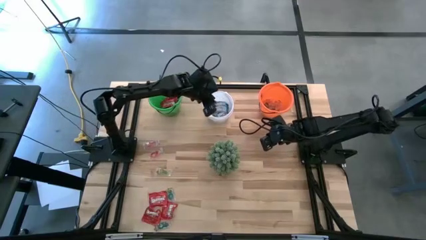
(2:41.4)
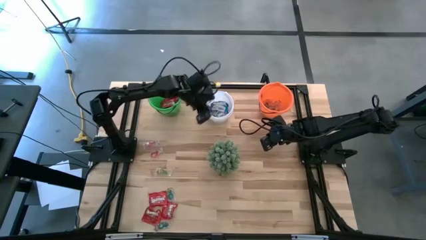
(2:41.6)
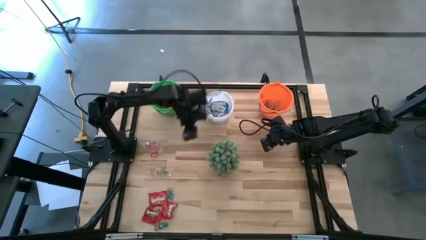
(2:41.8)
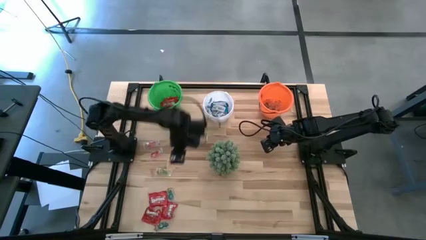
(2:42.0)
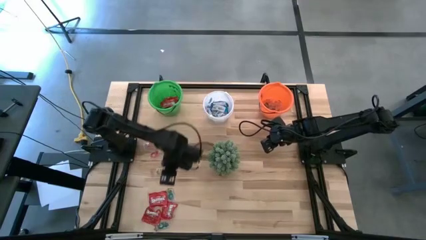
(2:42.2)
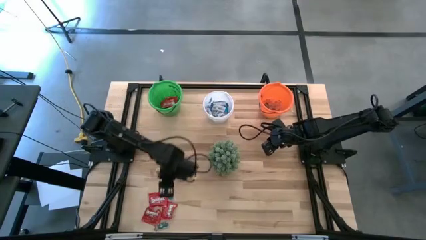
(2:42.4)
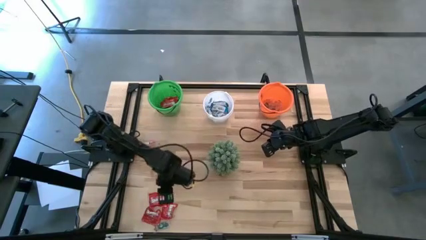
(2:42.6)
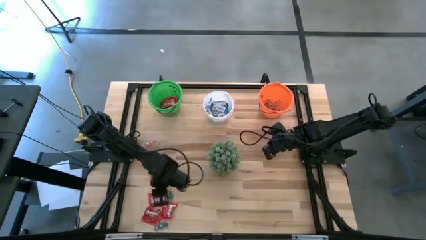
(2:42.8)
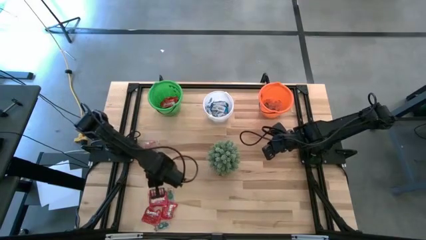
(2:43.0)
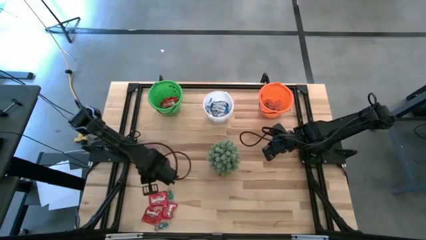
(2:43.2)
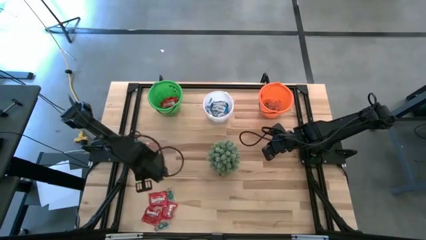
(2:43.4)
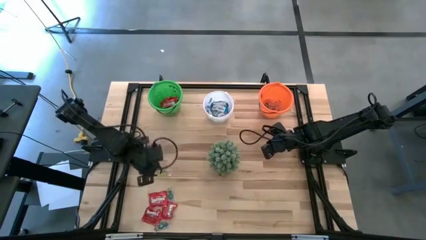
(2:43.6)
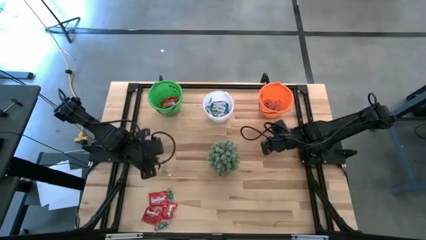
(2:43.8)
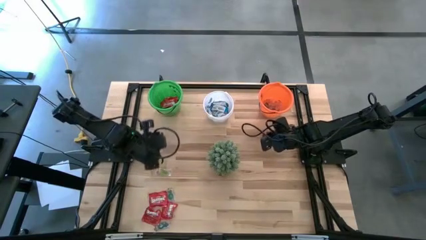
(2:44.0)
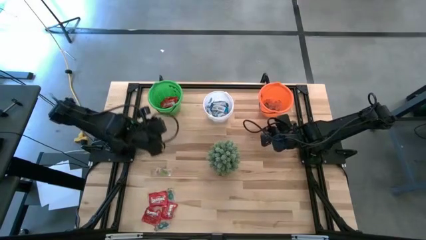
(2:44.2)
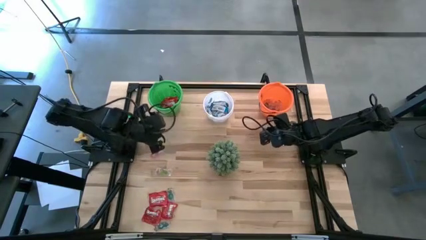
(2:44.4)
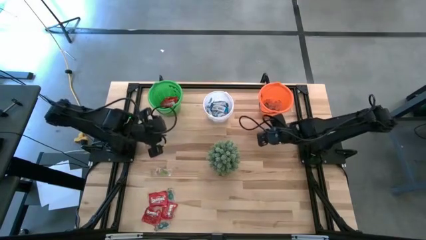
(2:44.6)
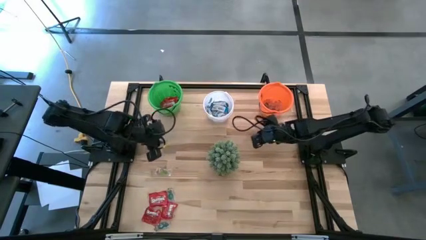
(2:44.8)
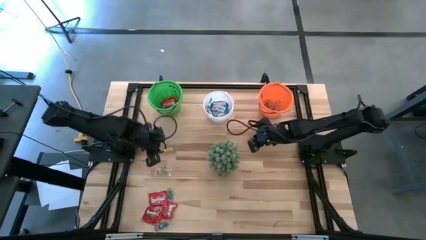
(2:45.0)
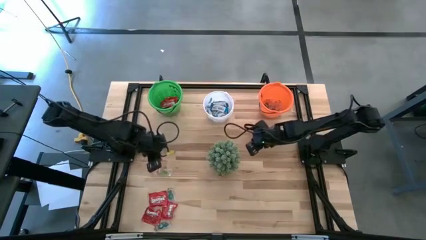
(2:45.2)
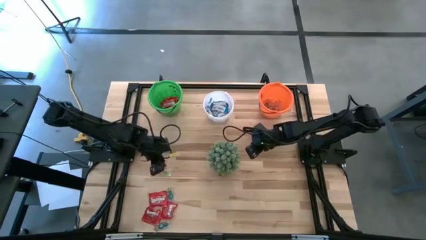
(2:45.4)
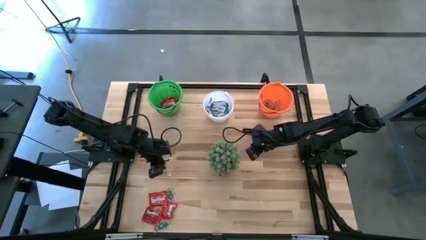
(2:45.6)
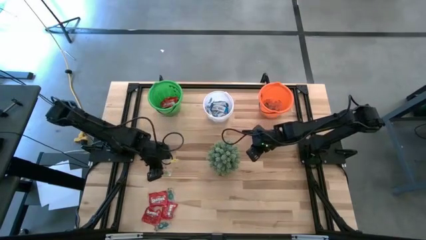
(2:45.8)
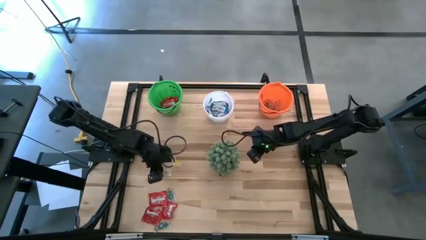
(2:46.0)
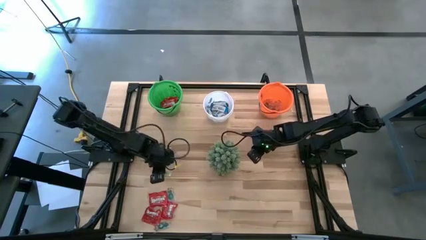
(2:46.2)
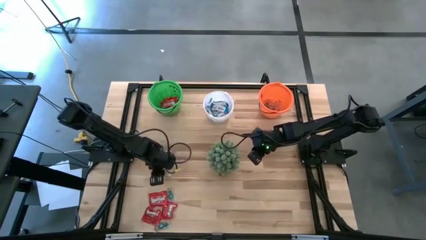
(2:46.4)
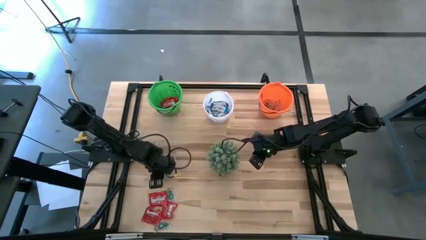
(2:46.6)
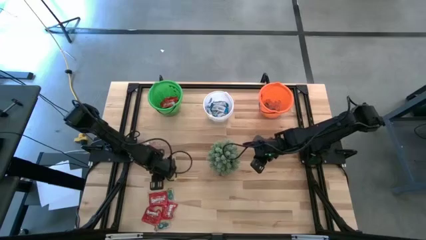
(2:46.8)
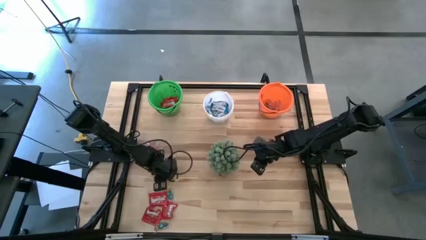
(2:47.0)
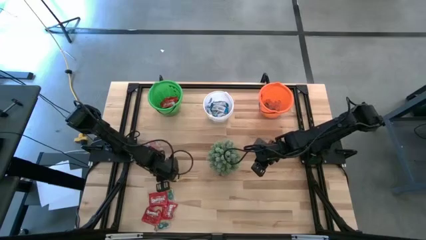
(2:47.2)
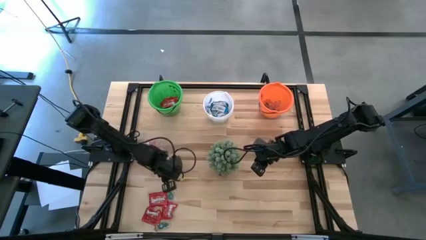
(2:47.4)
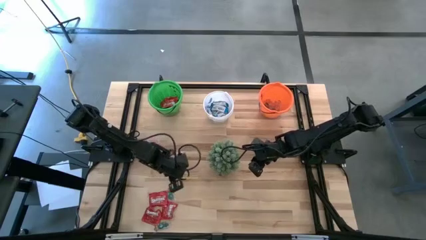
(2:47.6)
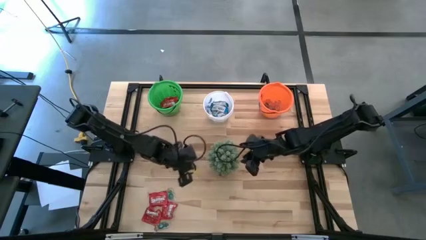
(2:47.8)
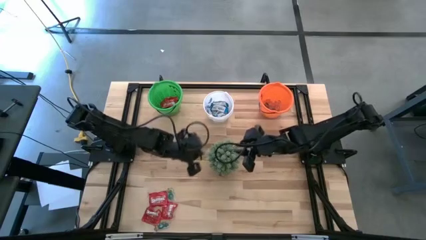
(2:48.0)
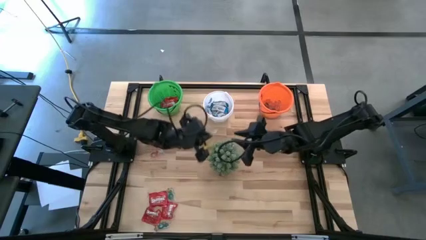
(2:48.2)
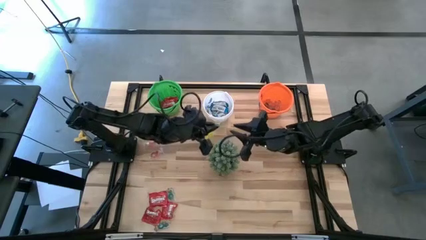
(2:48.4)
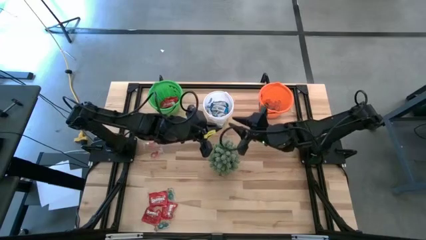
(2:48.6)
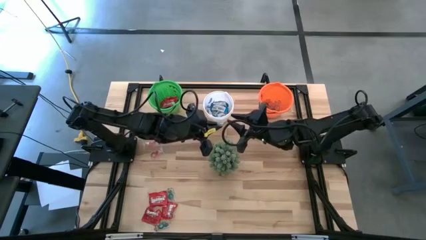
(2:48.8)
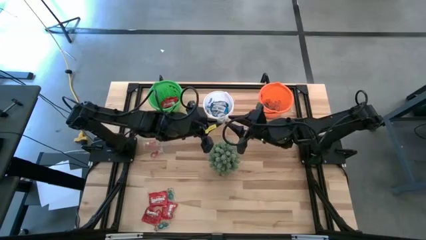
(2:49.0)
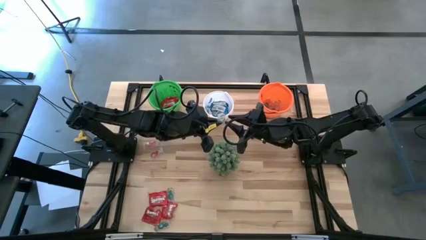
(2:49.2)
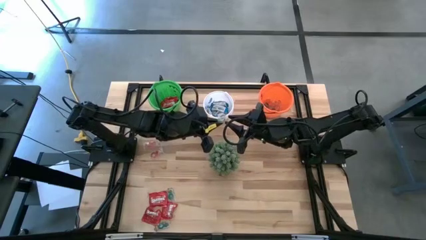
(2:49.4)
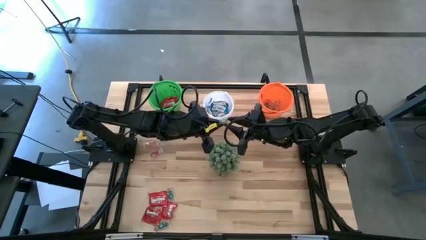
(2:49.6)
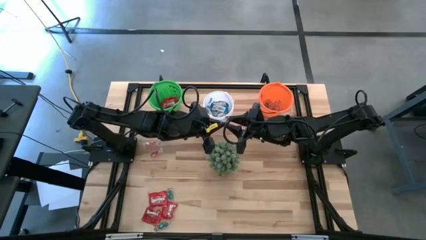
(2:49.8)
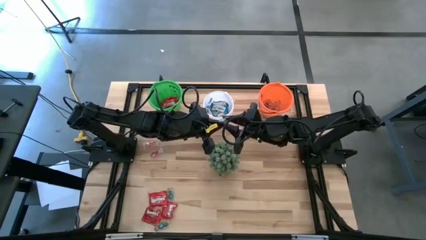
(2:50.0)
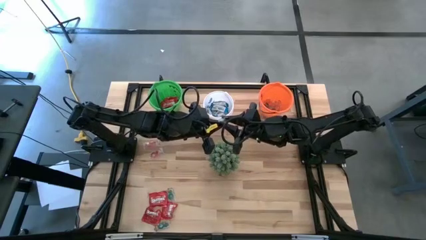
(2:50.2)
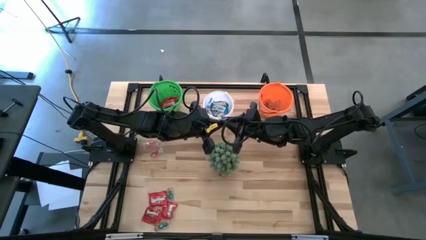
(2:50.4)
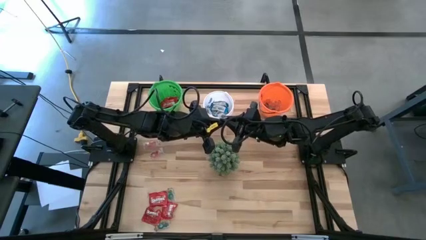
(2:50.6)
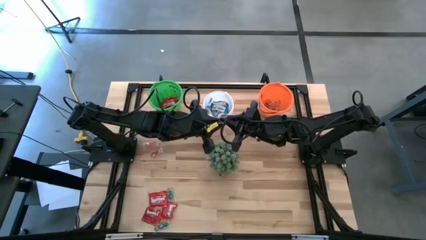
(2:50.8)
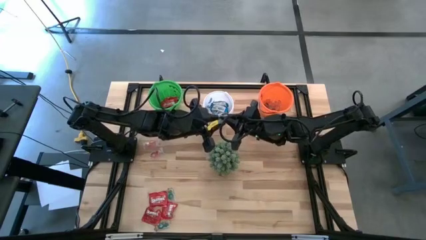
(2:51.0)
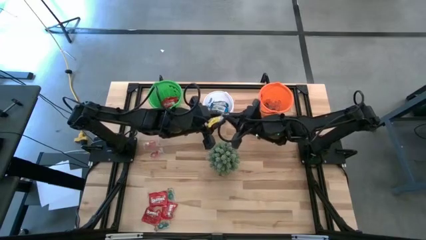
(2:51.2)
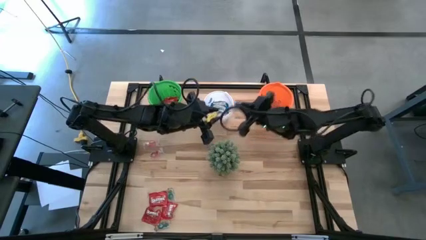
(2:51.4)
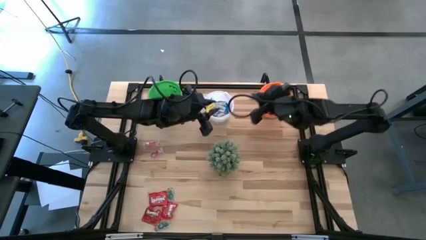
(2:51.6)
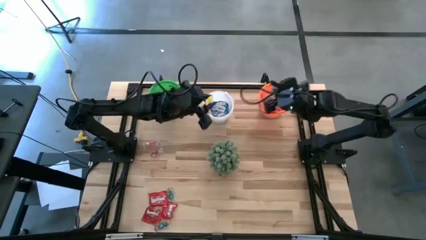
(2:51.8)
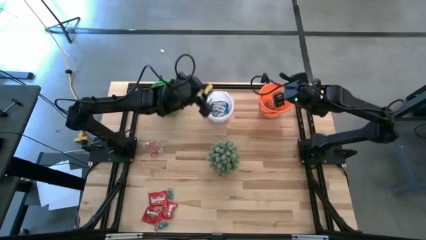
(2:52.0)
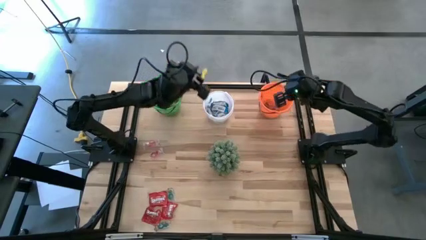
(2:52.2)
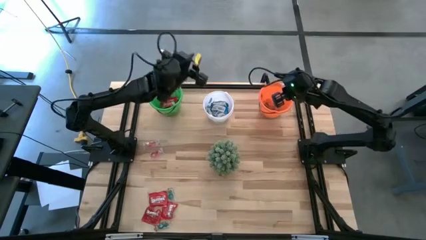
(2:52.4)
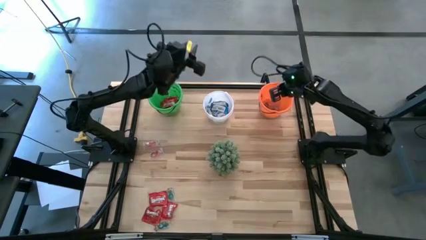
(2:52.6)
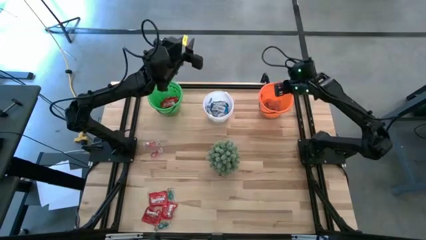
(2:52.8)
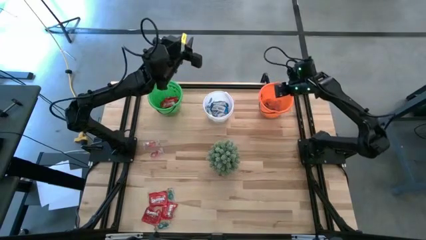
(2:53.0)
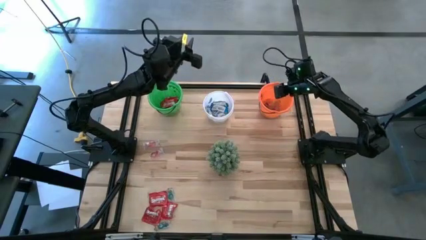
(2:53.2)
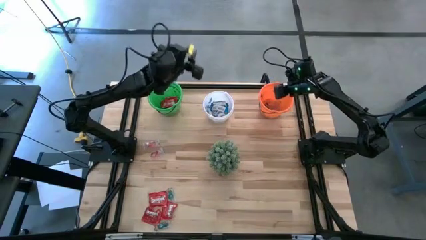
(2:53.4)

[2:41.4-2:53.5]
Task: Sort candy
Put the transparent candy into the orange bucket

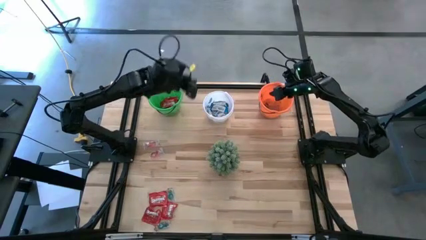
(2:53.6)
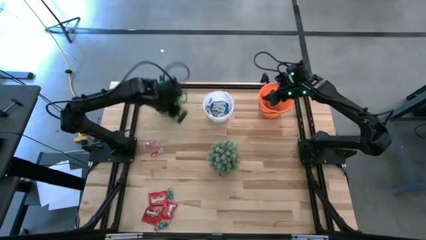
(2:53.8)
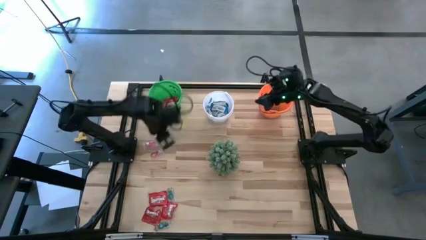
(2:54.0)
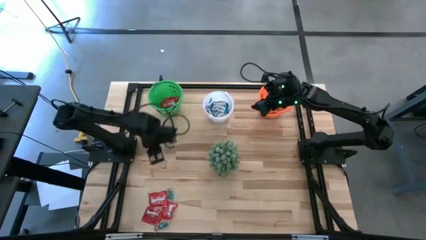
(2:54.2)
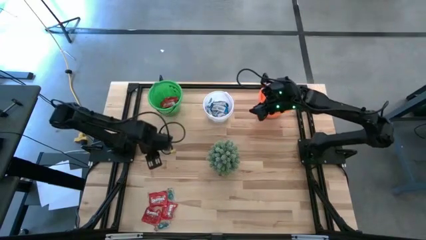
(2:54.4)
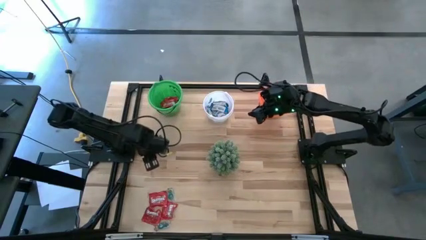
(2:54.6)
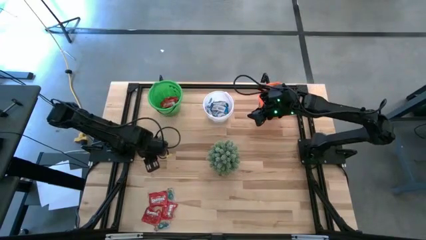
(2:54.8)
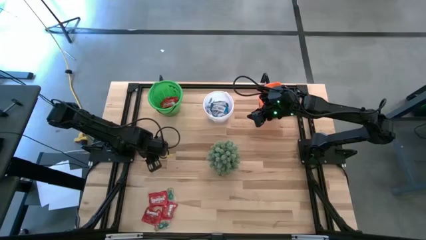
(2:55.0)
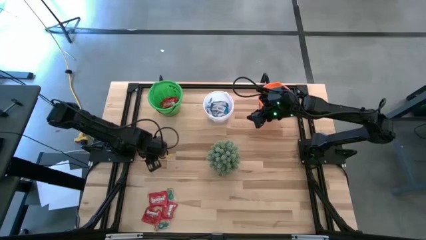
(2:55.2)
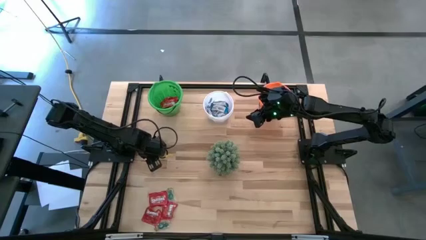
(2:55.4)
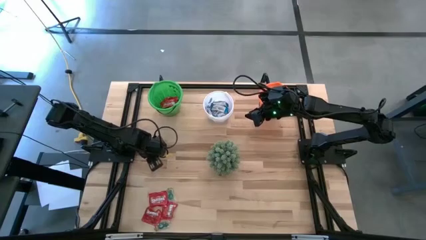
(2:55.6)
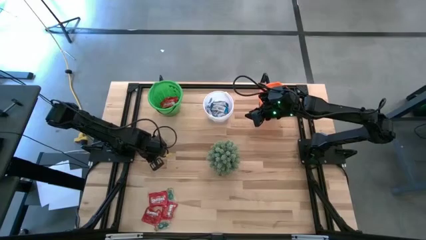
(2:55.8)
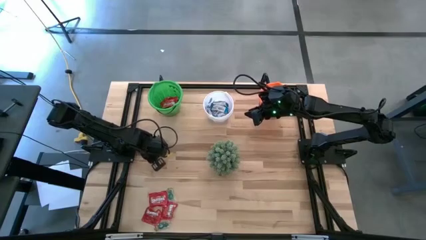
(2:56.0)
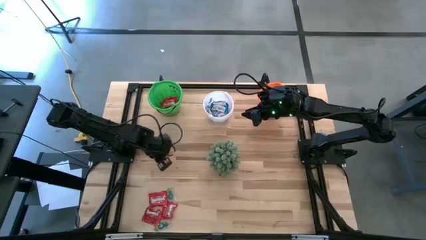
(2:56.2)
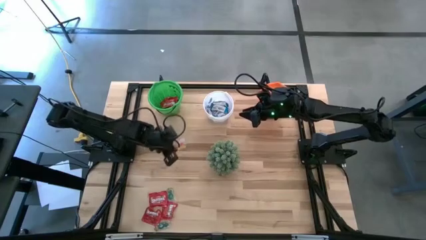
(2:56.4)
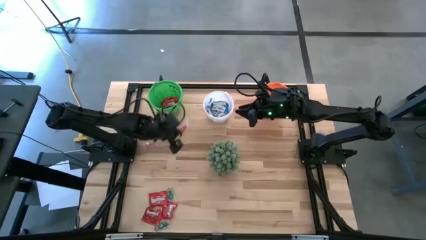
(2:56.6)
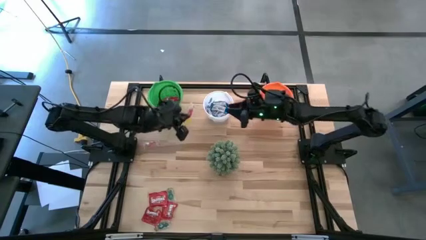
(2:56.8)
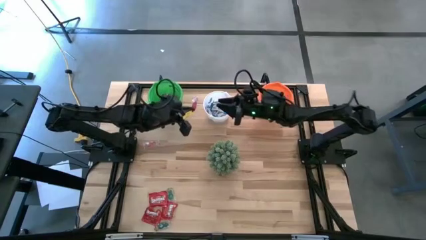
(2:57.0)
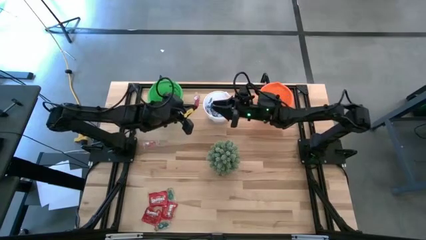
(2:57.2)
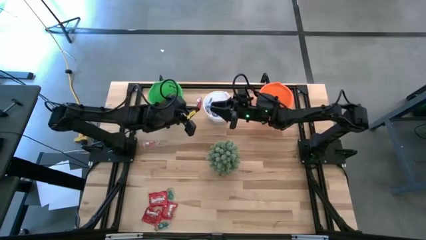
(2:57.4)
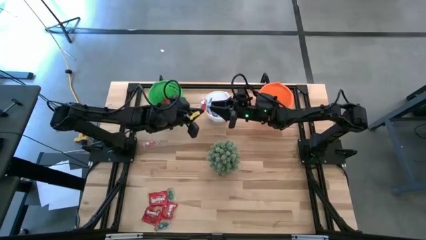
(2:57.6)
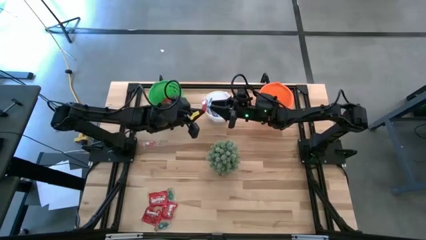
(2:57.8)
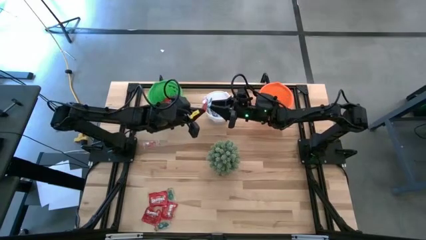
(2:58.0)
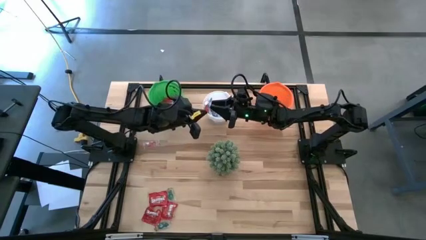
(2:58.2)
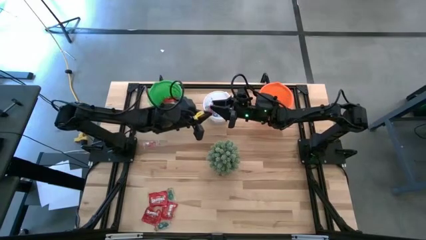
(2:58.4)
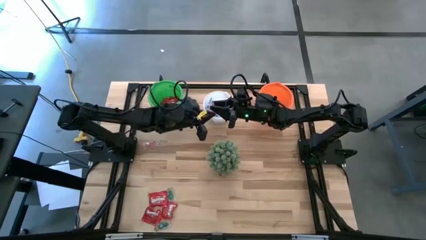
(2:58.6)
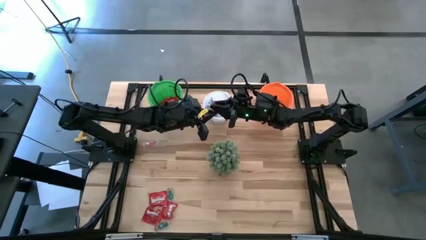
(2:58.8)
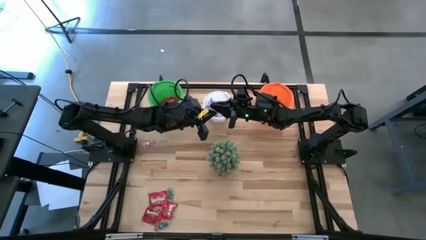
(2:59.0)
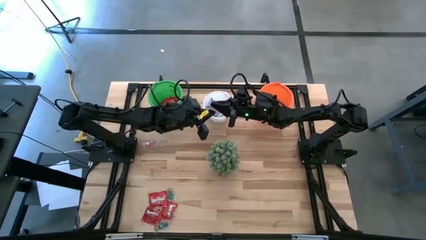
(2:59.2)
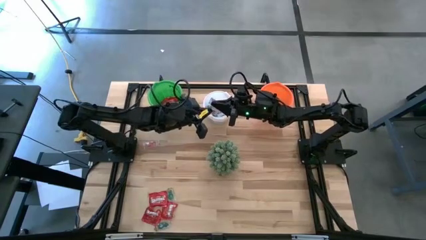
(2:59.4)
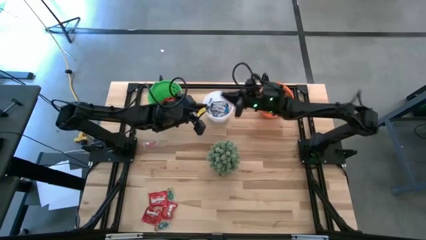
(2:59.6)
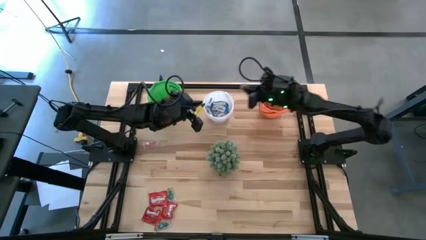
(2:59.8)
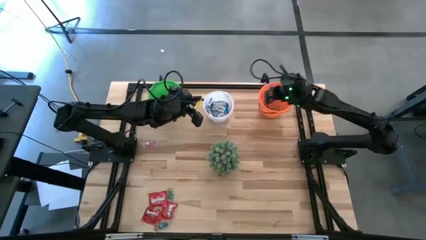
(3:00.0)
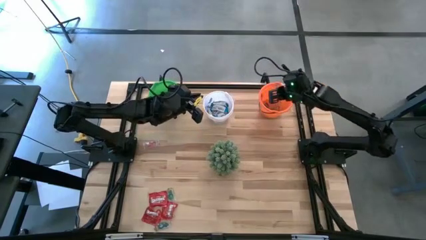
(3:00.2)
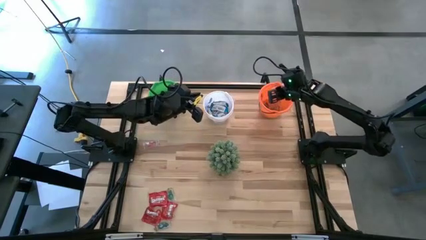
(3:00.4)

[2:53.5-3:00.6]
Put the transparent candy into the orange bucket
